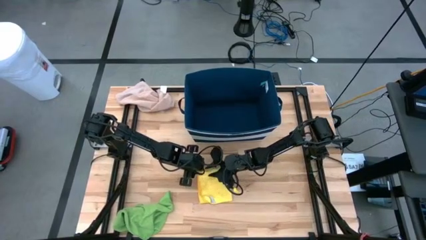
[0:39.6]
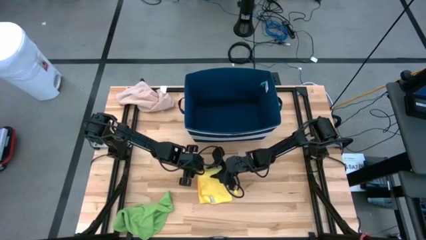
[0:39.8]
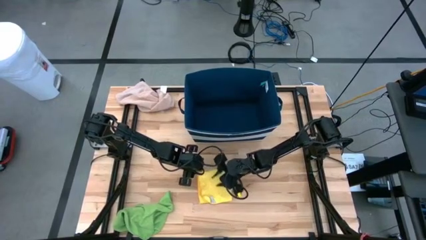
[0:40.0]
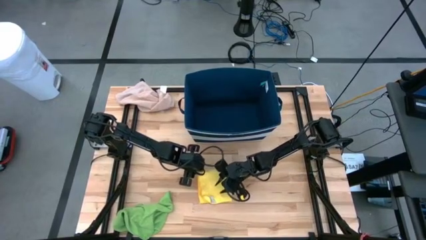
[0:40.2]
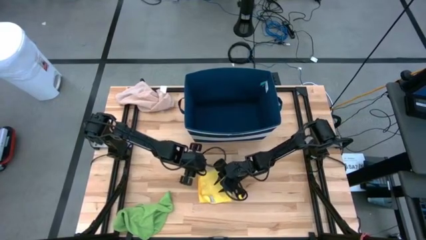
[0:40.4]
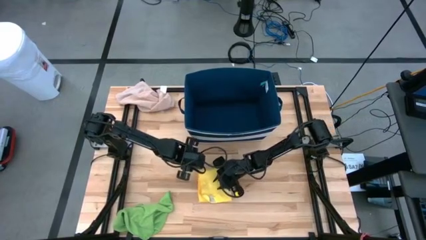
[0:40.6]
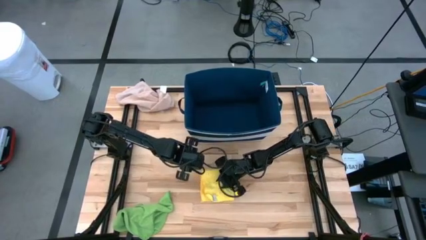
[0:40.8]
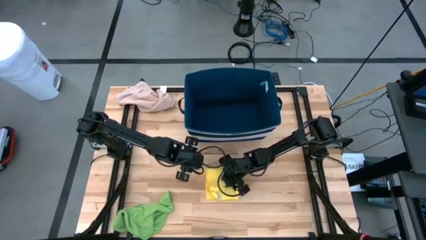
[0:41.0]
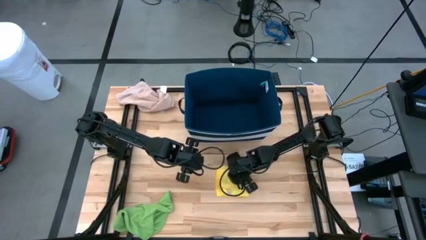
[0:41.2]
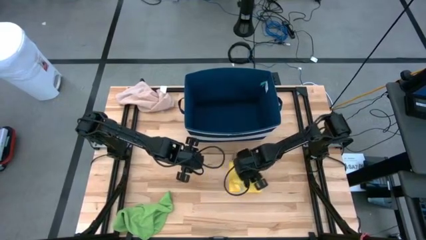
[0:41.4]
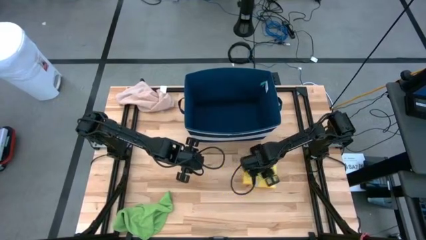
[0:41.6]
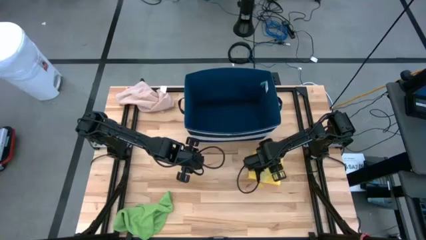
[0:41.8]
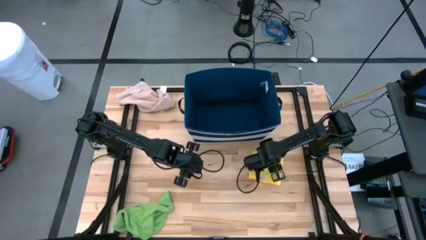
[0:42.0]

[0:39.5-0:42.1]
Task: Fold towel
Move the folded yellow towel from the center to the middle right

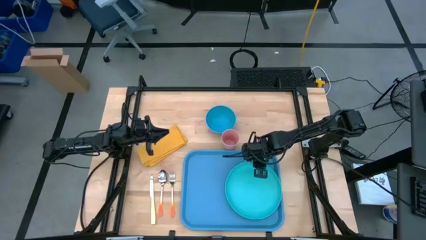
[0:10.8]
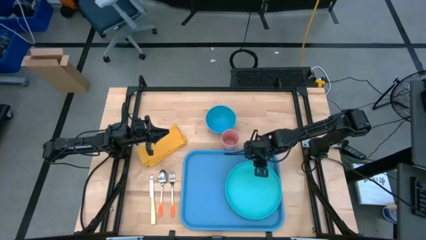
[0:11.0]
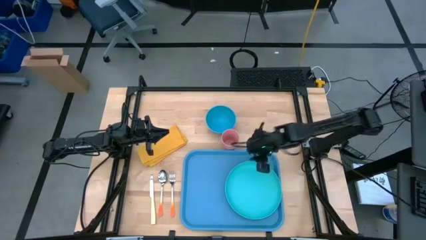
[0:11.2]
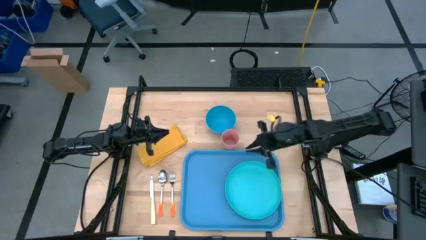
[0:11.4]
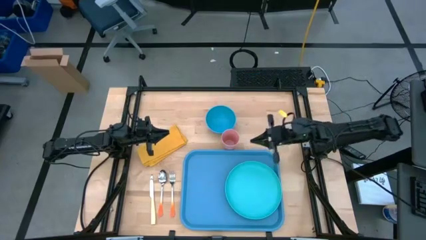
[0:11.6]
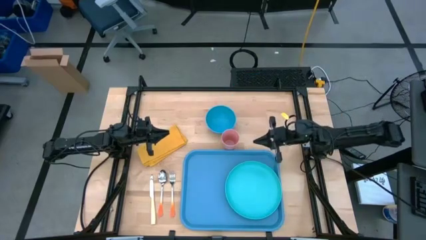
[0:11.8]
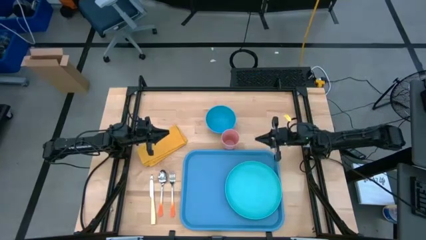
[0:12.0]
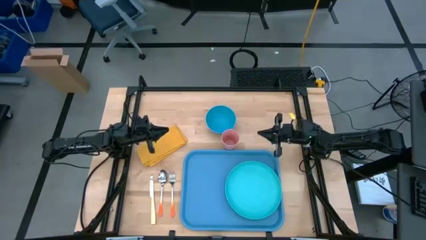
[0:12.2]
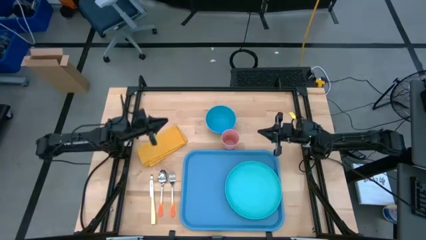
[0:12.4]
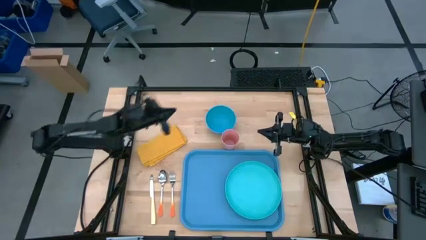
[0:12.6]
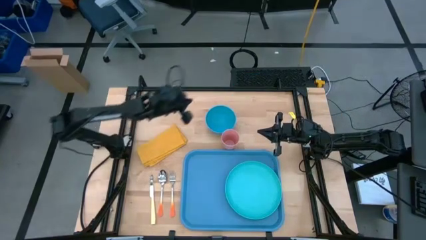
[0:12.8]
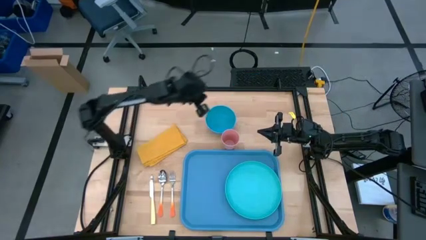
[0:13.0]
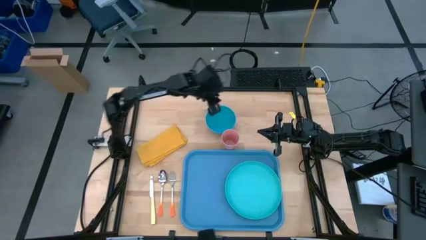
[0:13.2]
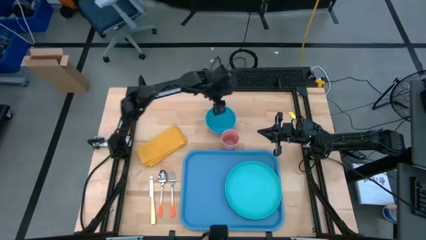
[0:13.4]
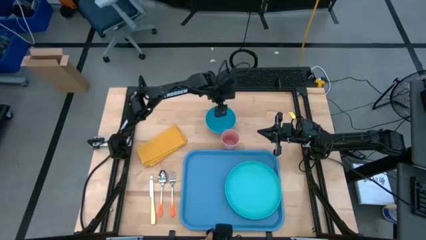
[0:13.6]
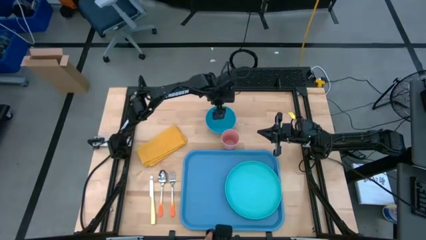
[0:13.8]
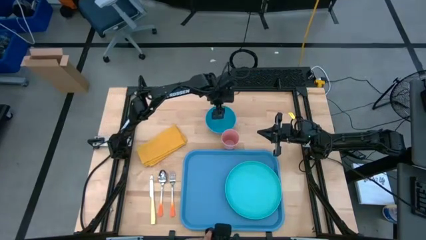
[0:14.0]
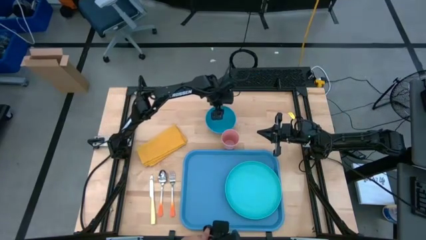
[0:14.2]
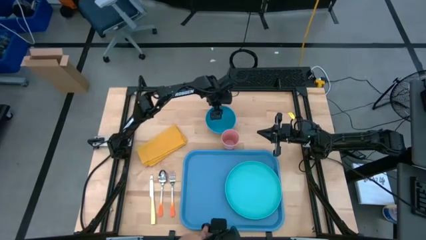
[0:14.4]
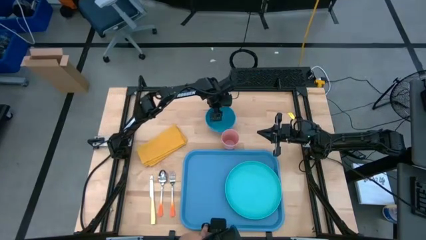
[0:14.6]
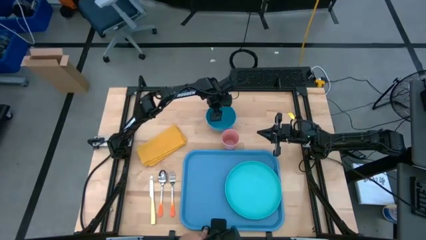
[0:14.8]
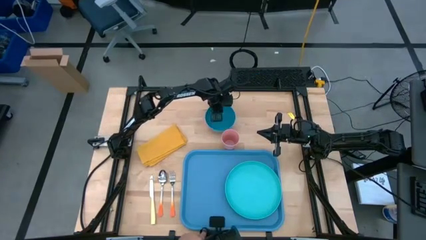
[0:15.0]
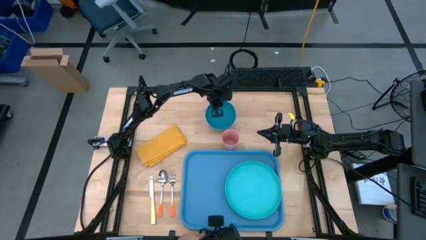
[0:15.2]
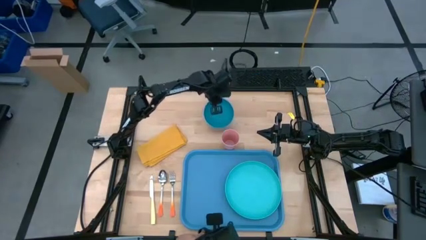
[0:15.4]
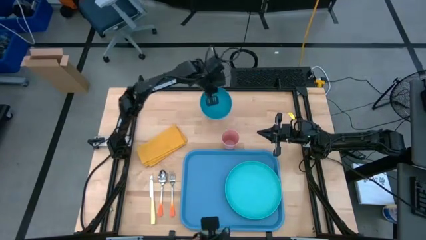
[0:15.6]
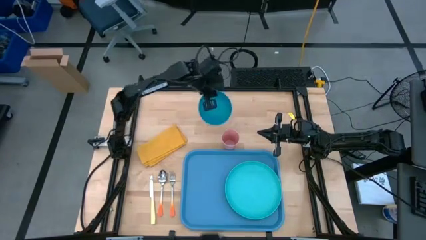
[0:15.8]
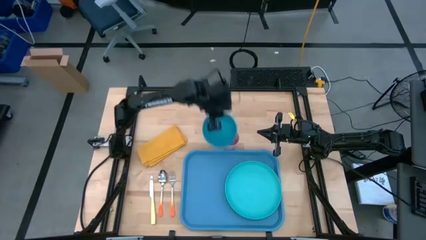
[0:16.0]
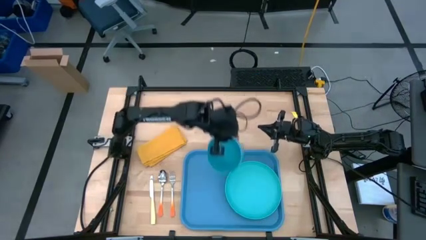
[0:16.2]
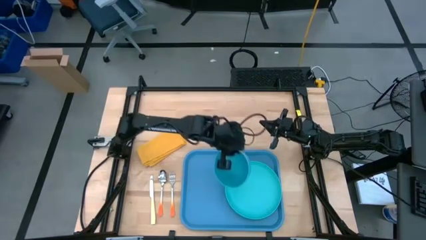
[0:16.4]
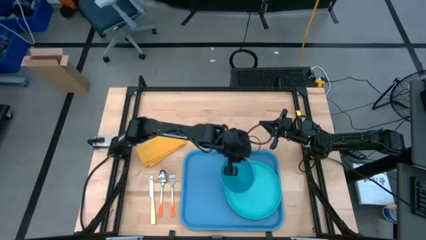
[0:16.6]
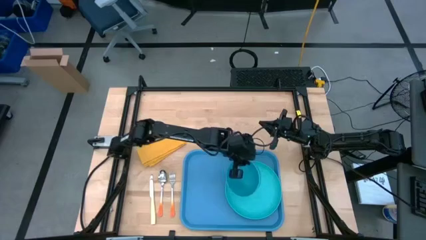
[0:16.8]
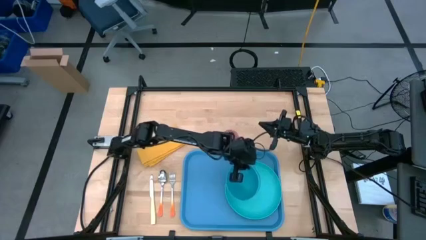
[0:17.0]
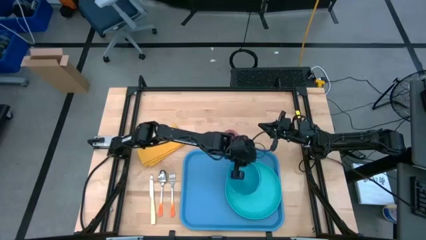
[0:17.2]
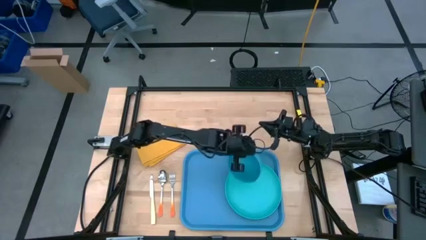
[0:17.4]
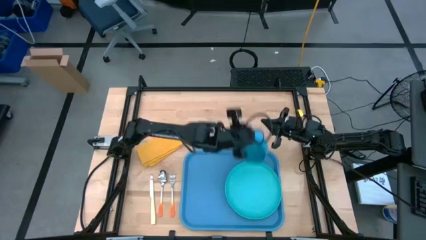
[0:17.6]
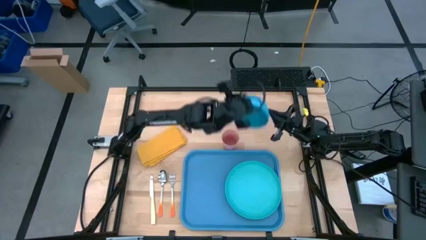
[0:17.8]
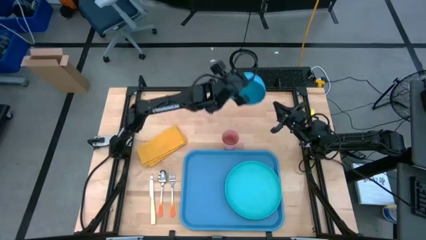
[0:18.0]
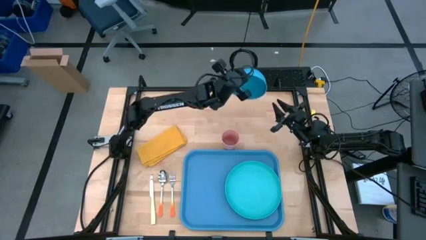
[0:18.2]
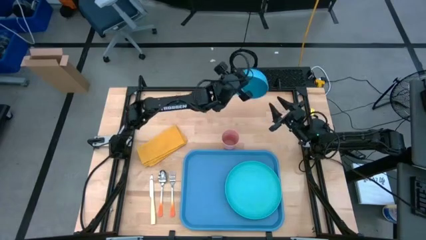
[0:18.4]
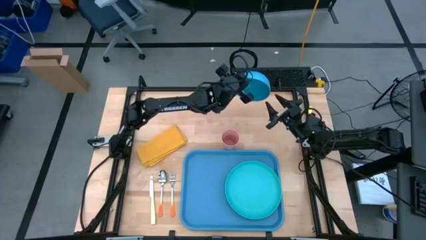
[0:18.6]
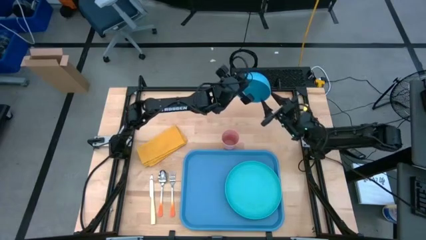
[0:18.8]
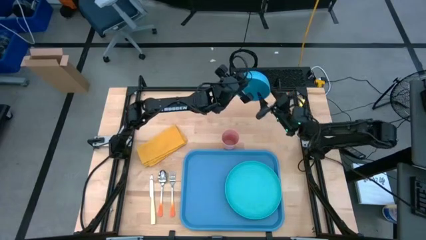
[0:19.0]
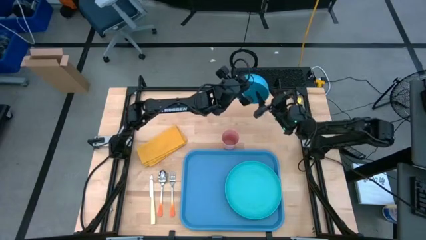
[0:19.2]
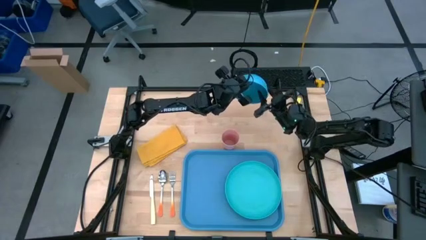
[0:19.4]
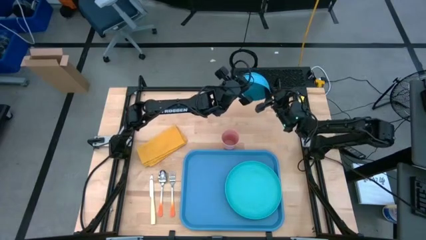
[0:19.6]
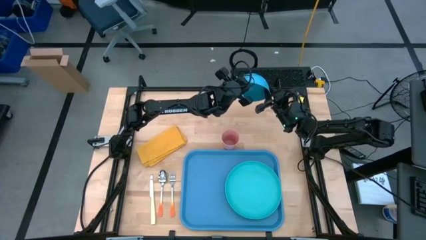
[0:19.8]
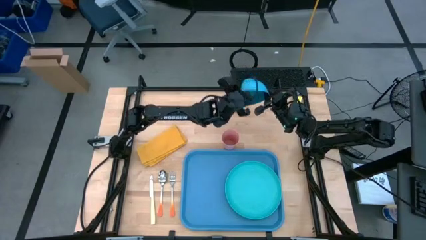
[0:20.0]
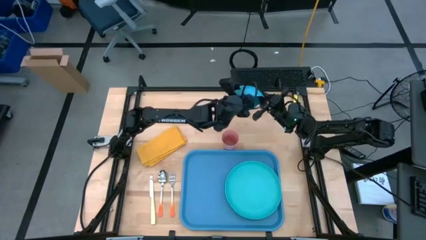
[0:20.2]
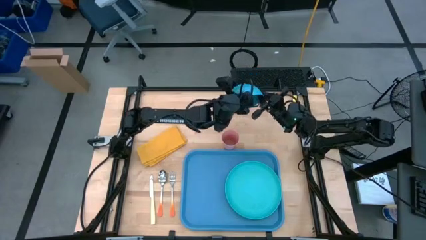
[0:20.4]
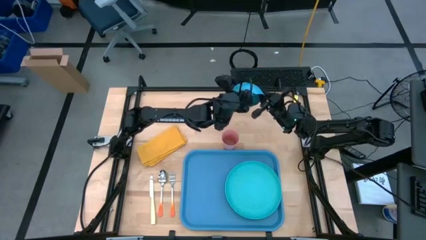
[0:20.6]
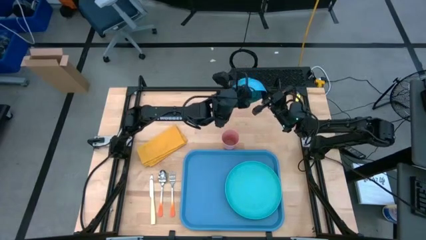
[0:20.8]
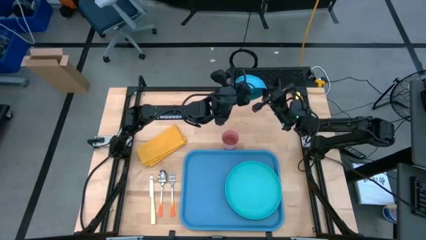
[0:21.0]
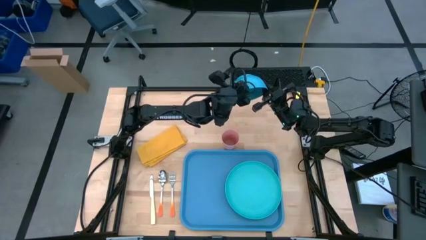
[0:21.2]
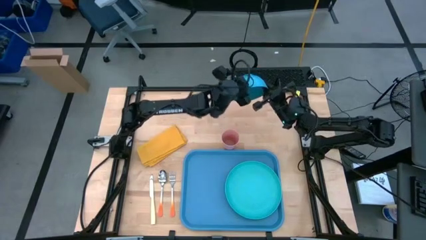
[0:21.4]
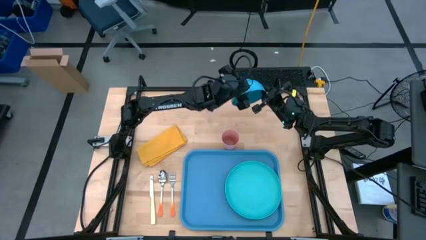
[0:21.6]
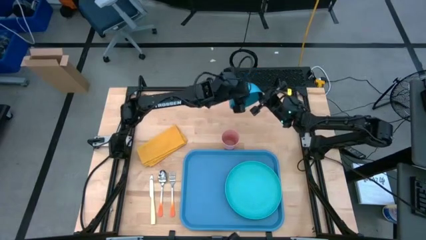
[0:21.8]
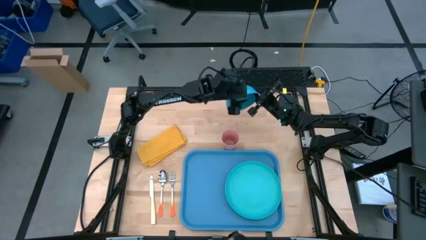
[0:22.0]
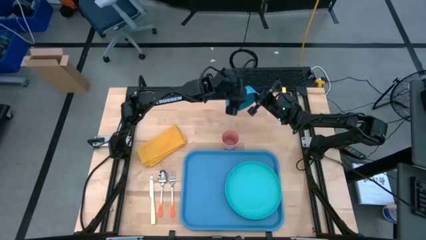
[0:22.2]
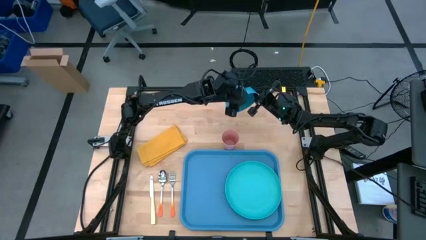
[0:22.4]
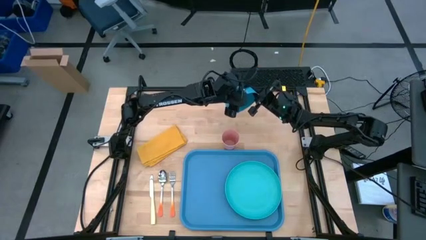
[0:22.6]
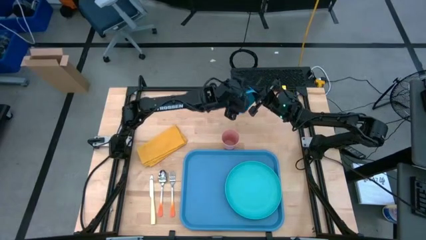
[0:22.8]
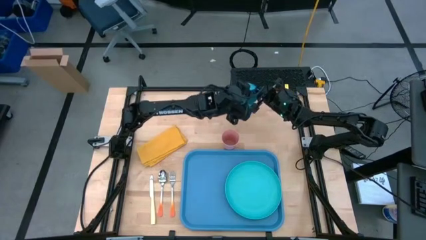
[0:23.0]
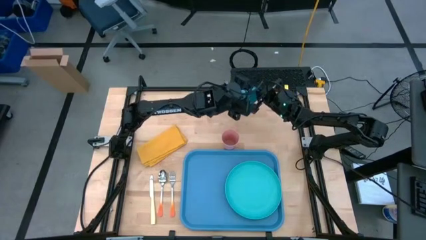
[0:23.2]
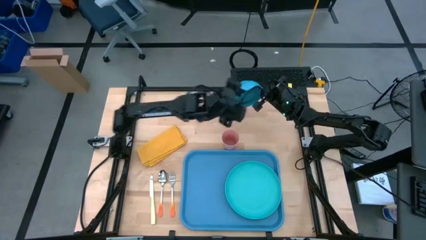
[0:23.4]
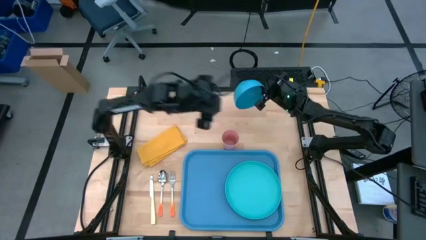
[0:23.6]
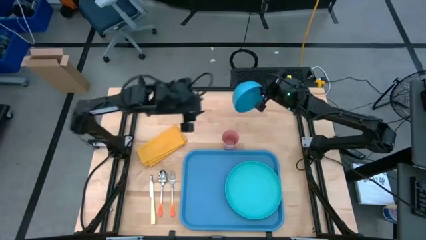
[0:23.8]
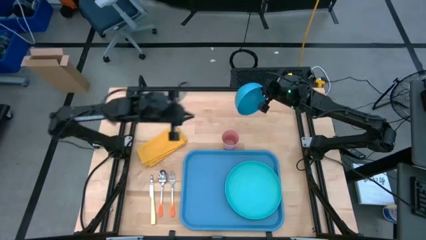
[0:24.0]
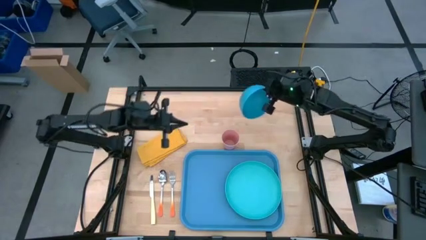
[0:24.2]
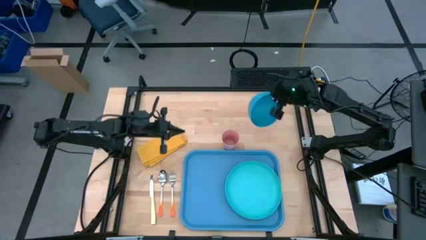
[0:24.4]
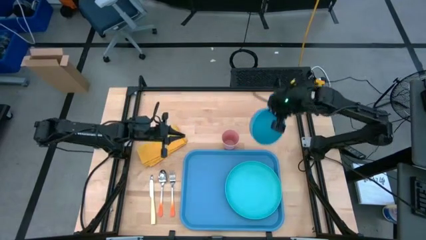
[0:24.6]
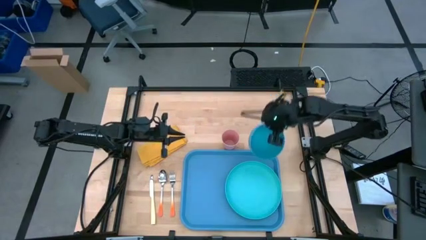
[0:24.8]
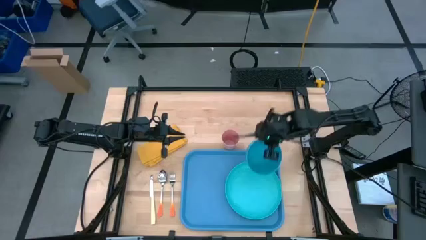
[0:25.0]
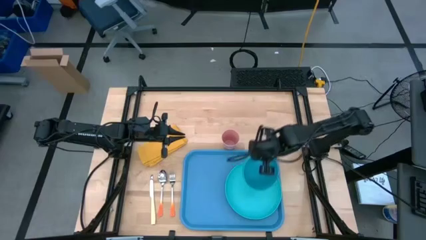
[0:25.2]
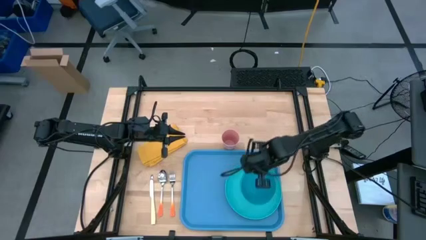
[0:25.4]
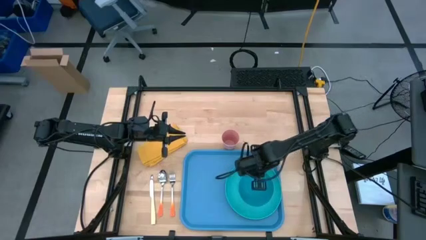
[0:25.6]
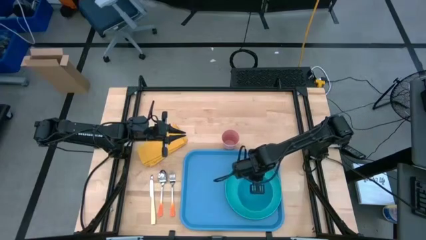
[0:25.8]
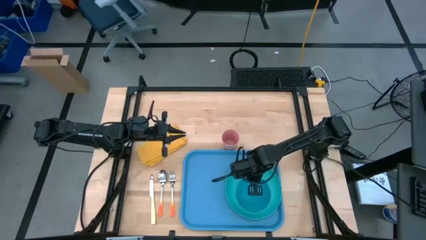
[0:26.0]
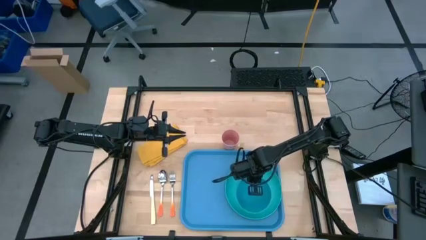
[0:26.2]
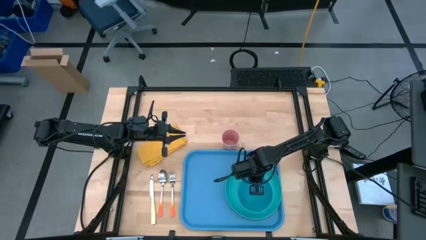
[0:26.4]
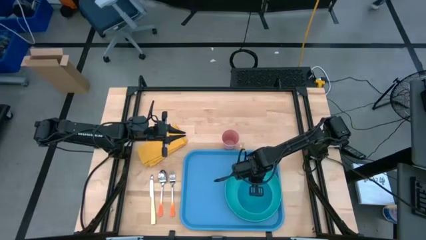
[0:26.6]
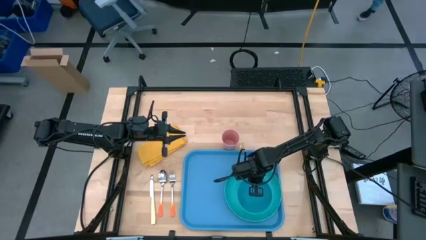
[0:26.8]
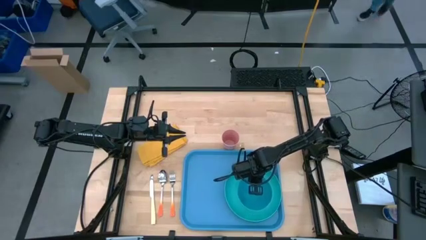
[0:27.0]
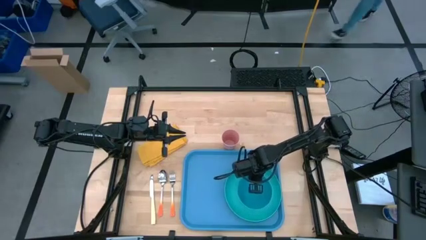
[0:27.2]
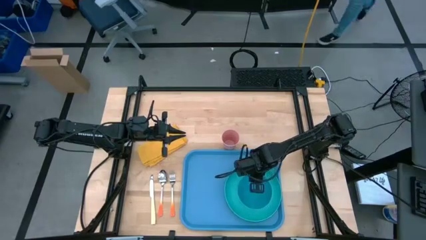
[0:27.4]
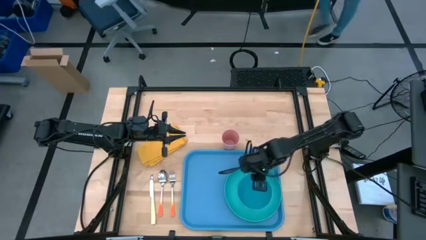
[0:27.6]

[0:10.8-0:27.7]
Task: Set up tray
Put the blue bowl on the blue plate
